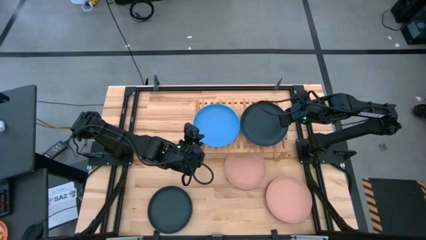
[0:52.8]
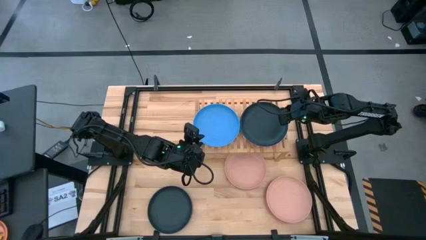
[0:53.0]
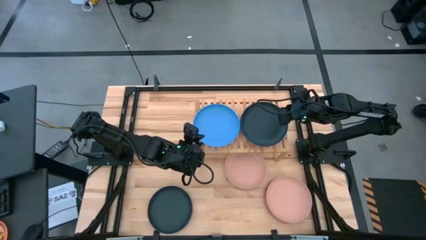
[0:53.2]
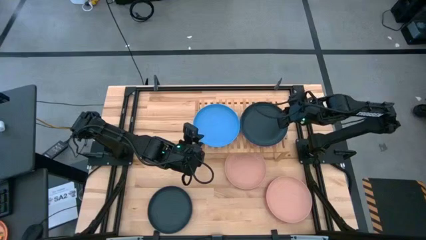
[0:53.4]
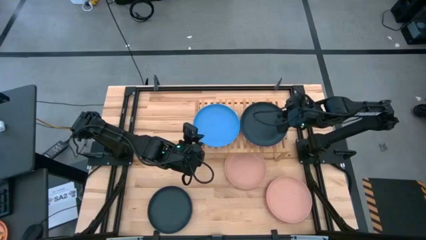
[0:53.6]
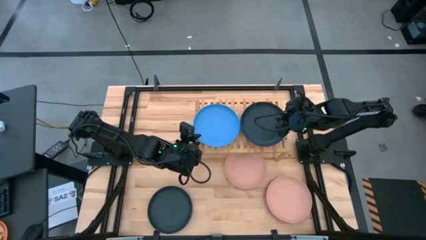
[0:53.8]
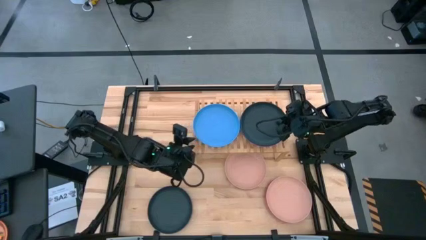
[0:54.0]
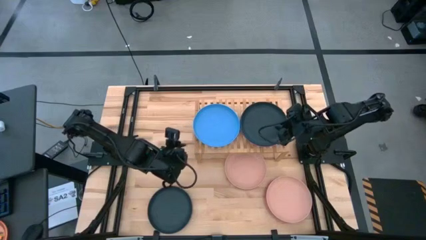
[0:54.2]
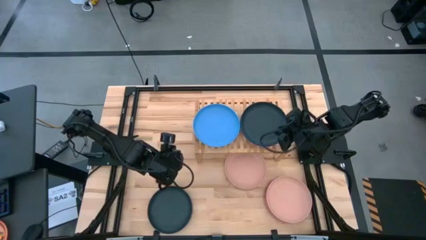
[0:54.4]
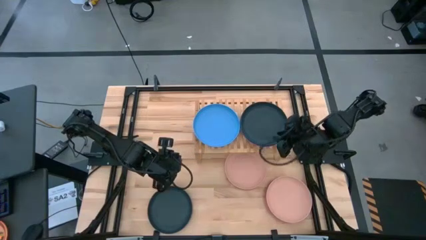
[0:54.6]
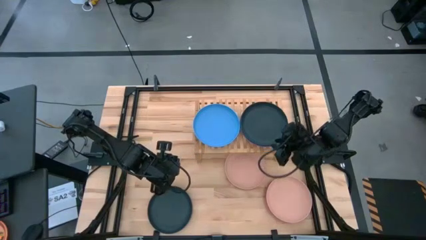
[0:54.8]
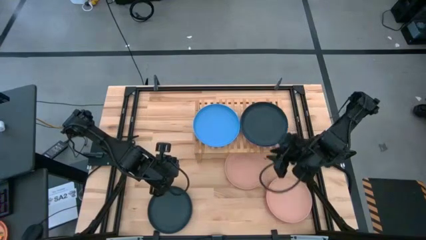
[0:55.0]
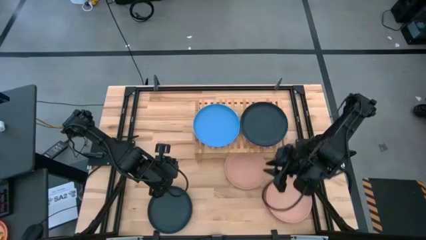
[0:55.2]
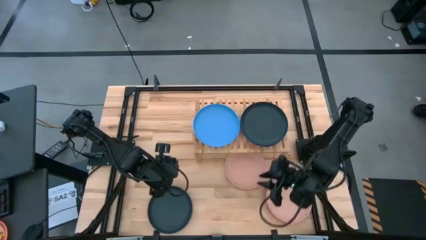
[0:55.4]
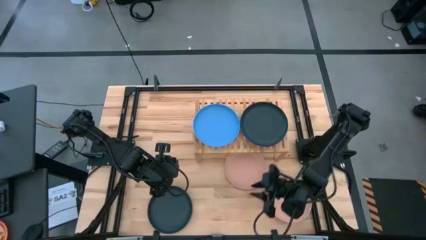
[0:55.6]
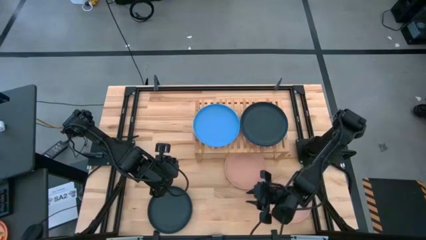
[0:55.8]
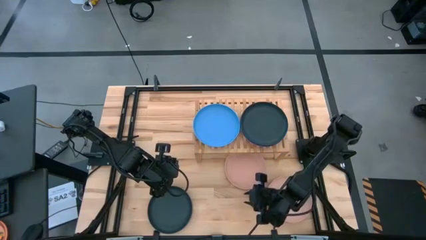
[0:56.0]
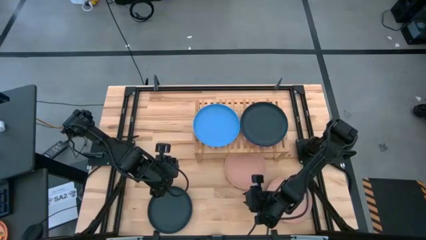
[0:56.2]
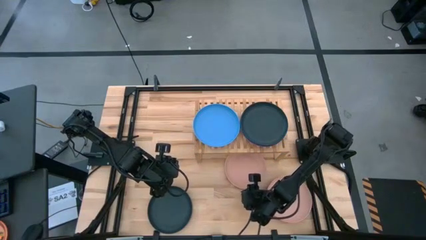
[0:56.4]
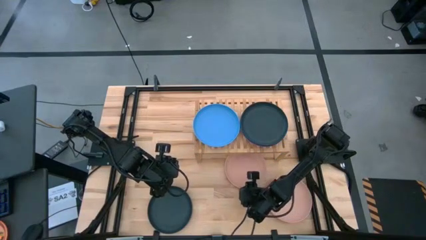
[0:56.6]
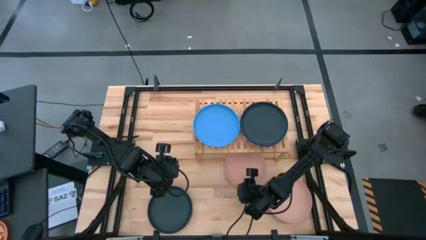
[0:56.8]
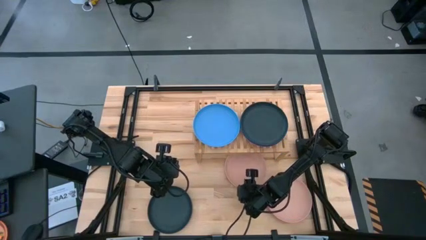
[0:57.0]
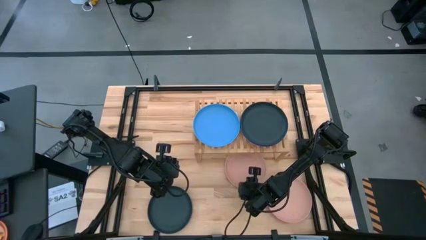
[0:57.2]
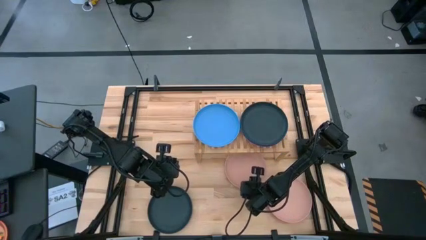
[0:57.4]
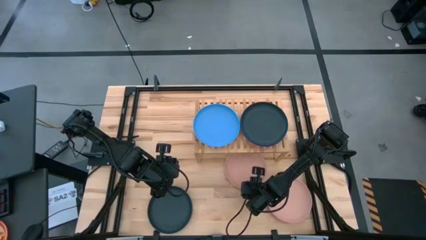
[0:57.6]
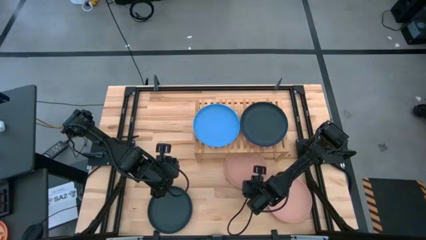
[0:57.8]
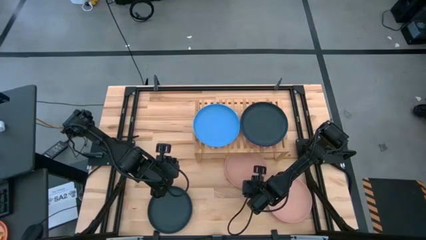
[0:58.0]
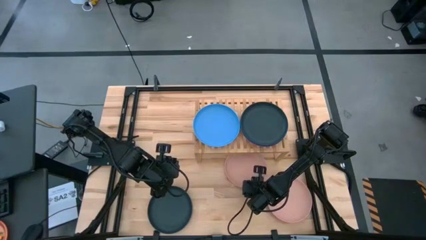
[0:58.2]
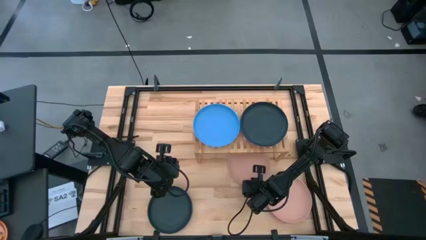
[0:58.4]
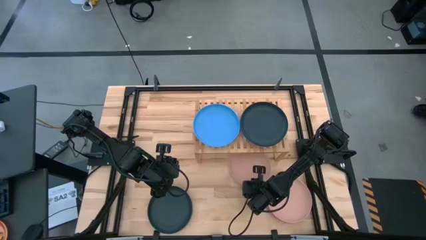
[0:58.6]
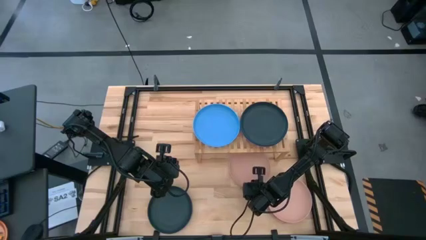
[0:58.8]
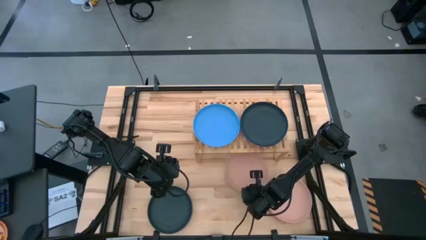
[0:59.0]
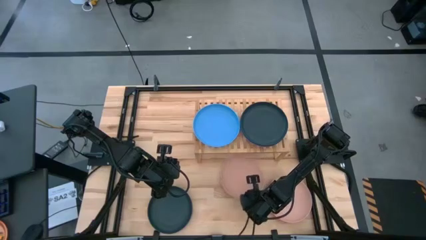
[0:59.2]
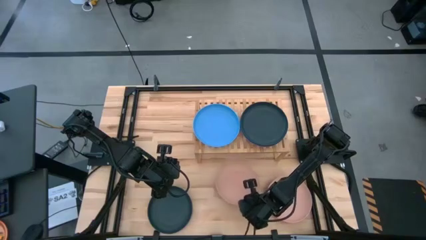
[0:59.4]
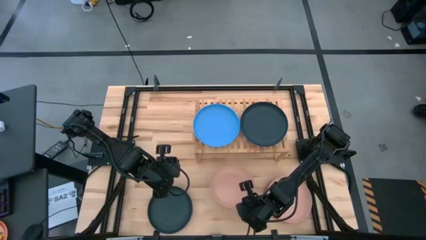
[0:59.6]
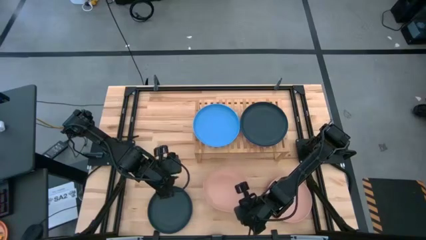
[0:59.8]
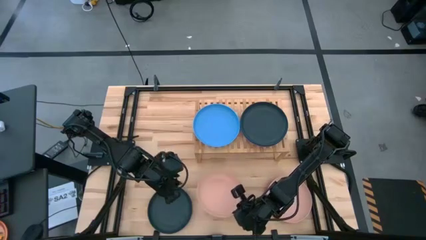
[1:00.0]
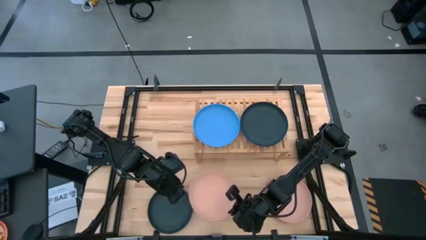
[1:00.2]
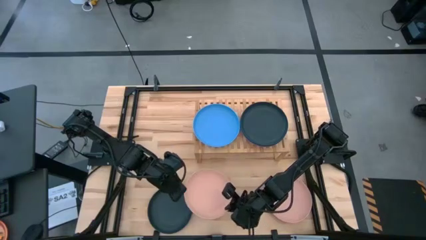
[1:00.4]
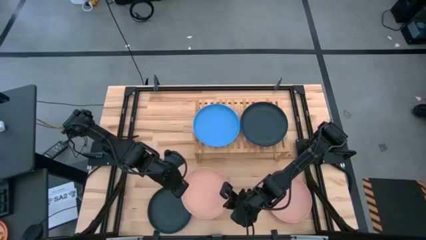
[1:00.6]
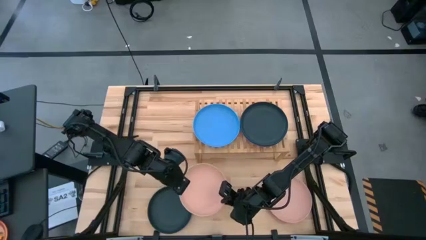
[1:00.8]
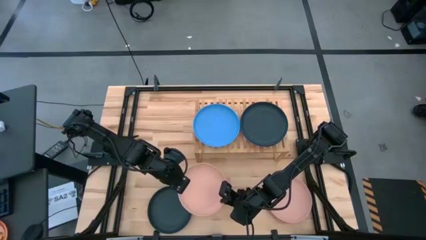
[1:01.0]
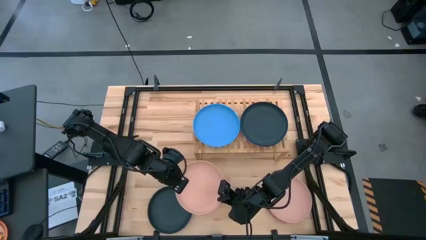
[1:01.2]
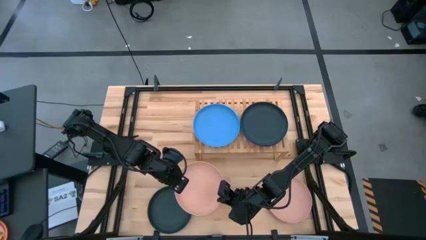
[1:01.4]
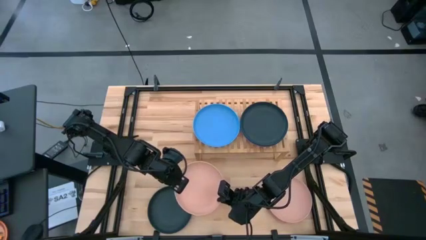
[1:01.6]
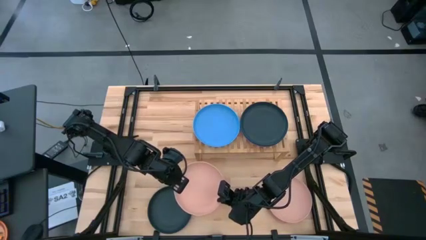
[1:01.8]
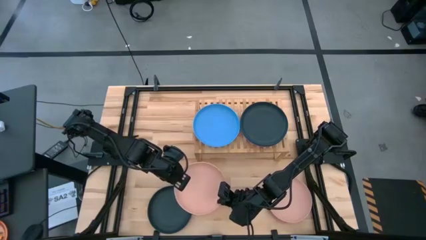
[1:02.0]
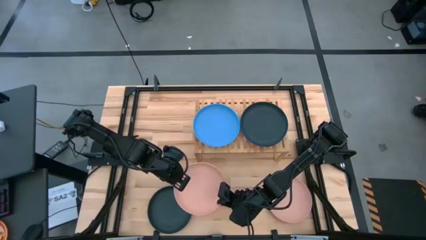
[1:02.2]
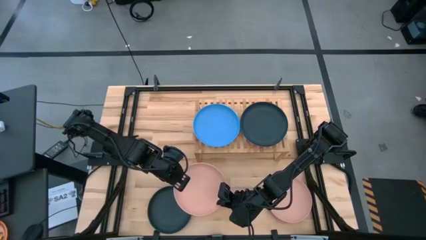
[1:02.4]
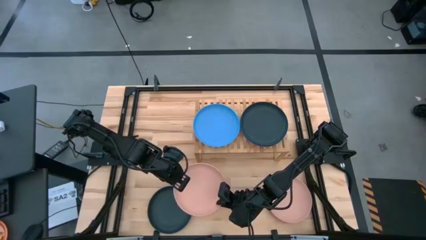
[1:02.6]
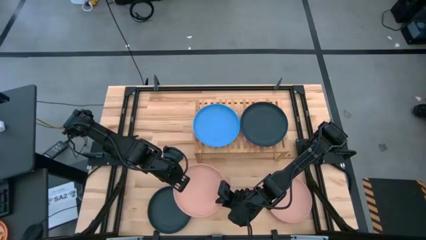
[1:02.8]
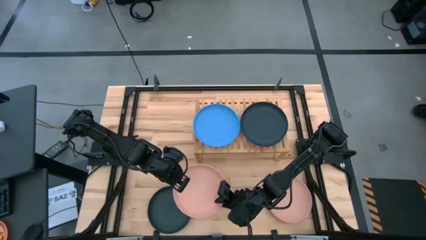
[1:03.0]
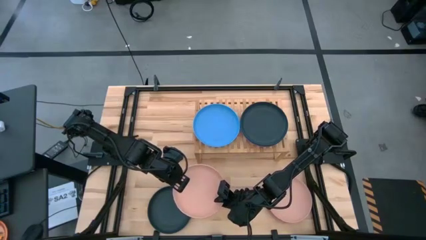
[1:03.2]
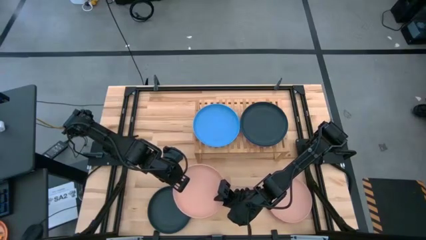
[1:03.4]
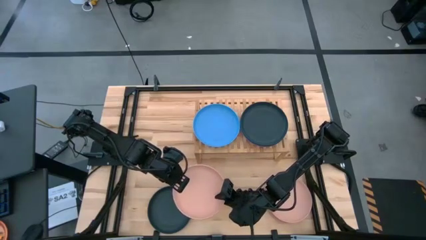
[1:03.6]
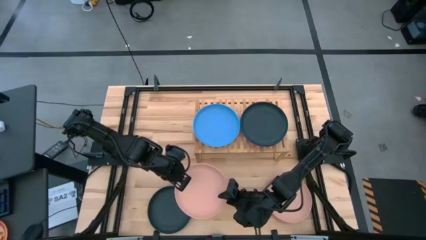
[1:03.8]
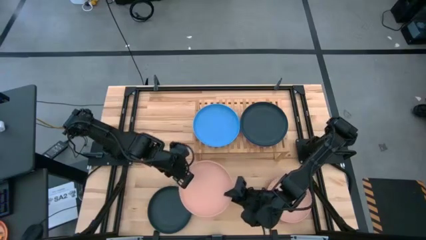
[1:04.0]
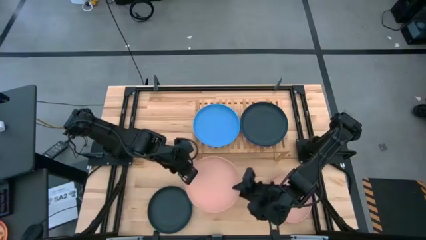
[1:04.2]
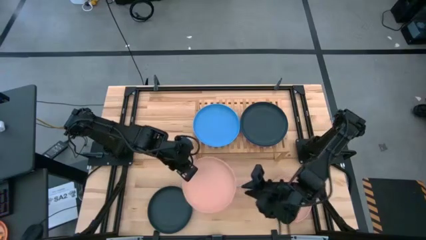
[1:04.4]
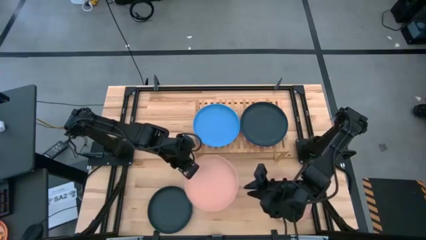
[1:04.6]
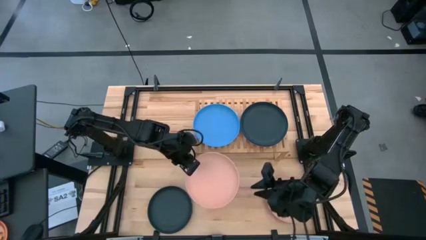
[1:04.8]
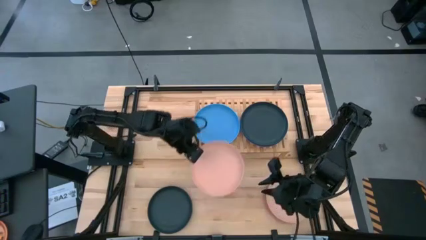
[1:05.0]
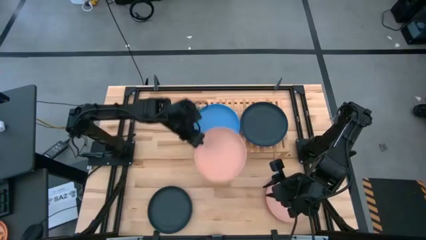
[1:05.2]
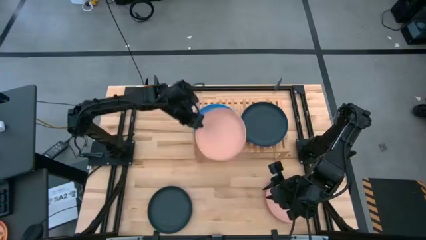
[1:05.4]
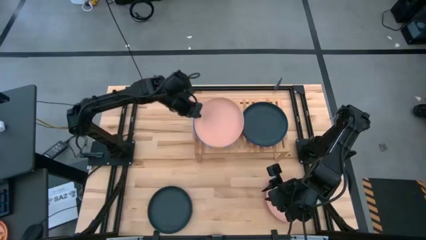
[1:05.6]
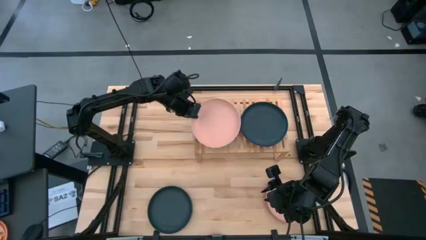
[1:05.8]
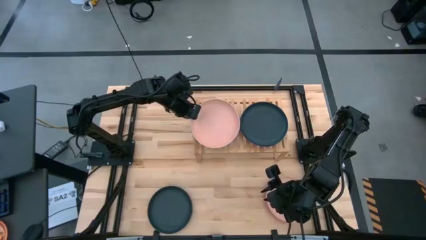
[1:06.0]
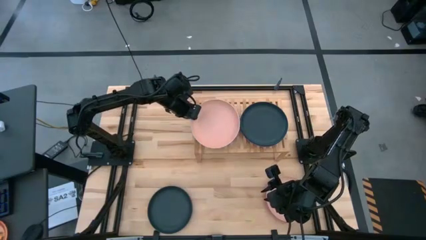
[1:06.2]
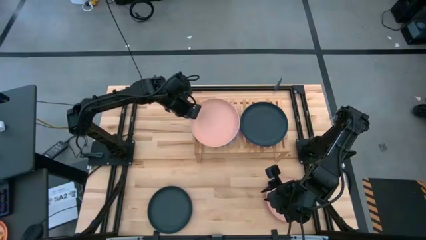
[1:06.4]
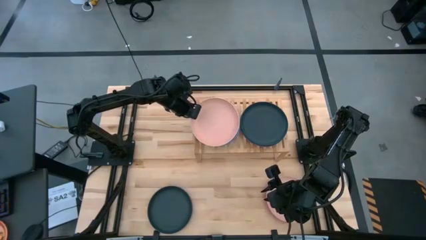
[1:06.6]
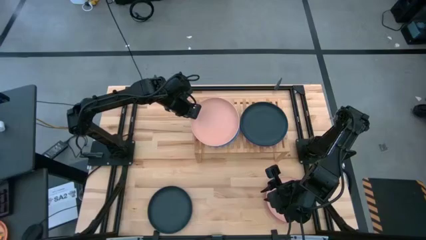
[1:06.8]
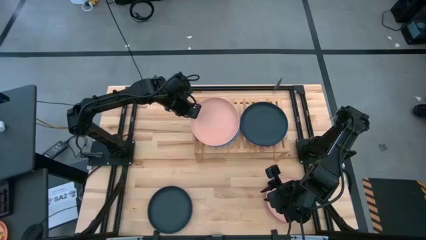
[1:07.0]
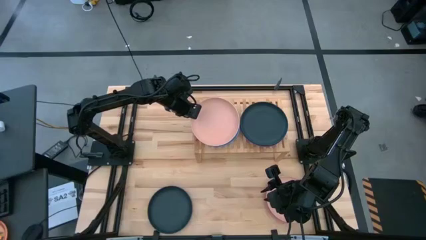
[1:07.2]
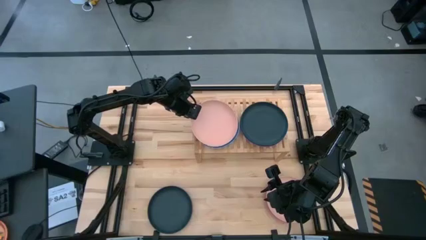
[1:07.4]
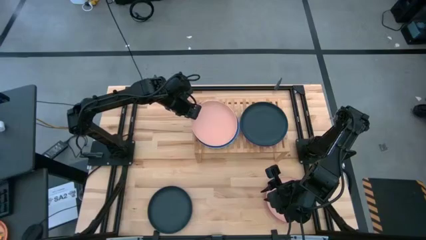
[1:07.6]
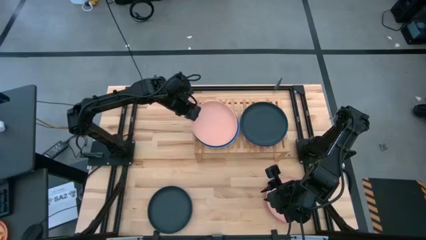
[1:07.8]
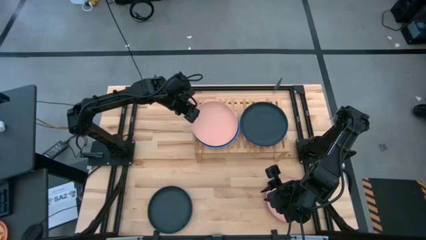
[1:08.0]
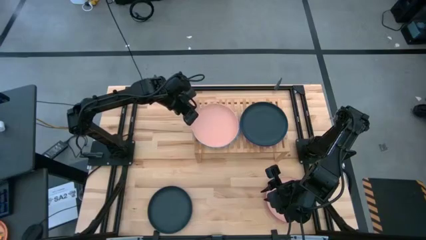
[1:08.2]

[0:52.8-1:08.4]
Task: Place and stack plates onto a shelf
Stack the left brown plate on top of the blue plate on the shelf
